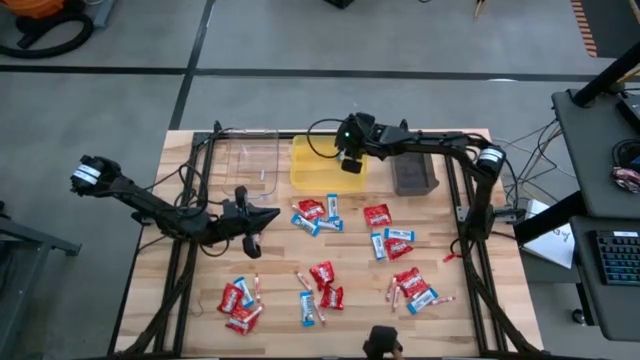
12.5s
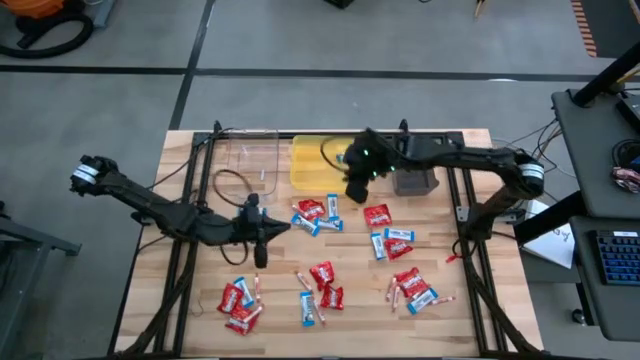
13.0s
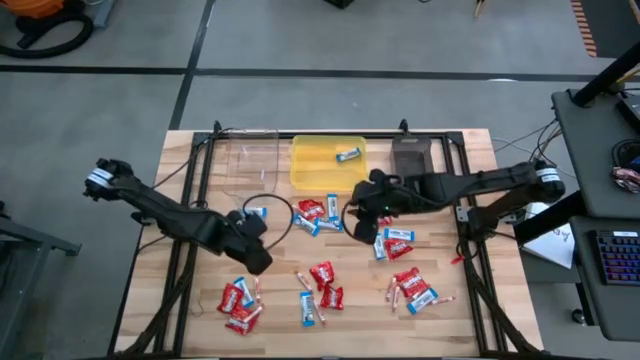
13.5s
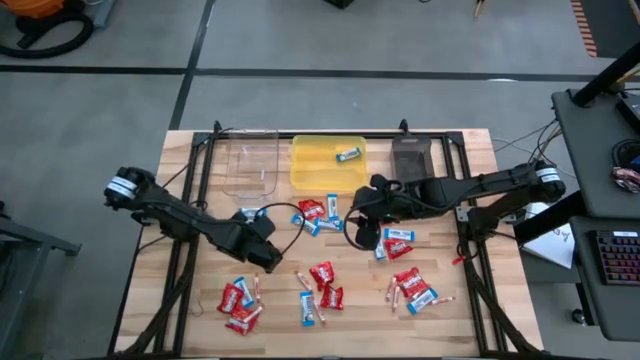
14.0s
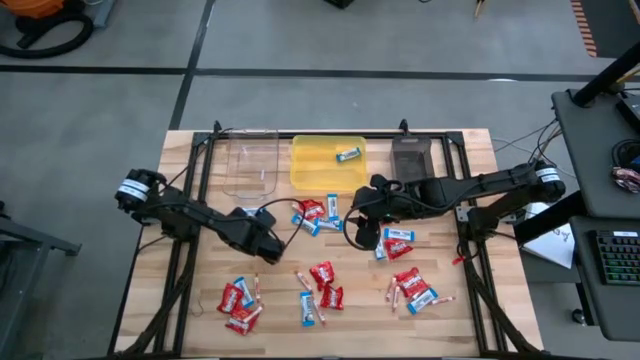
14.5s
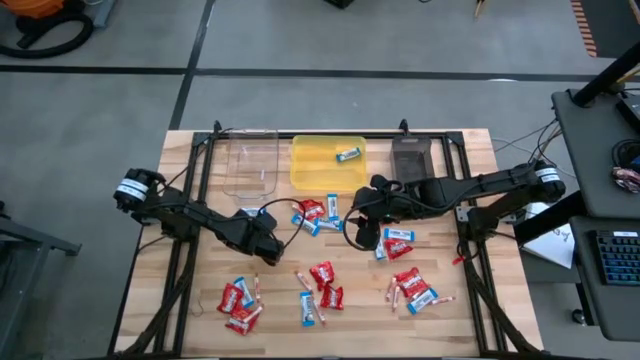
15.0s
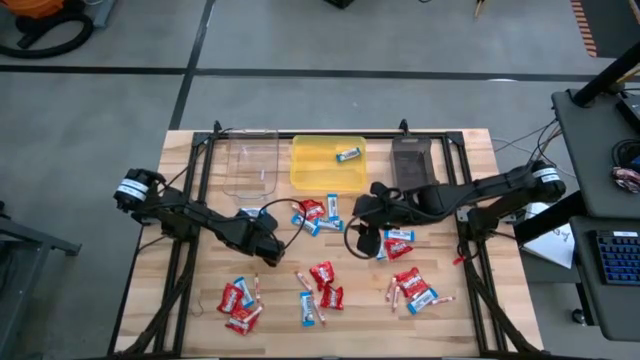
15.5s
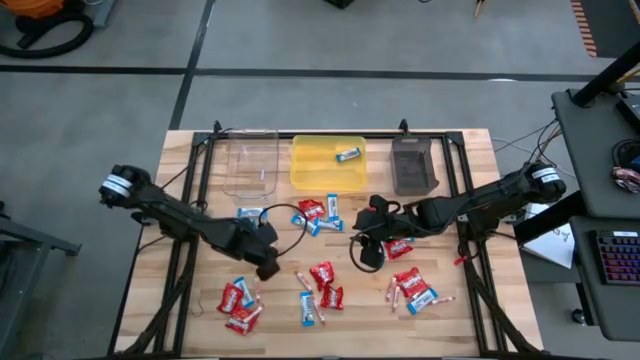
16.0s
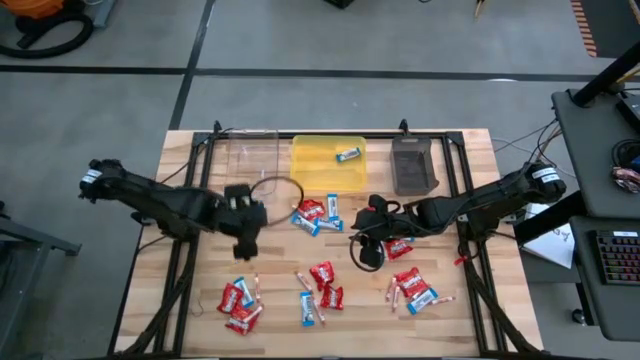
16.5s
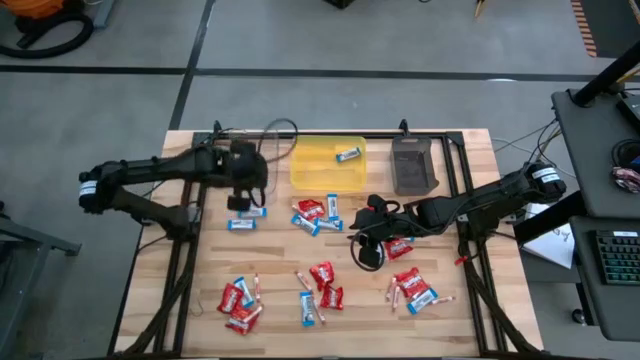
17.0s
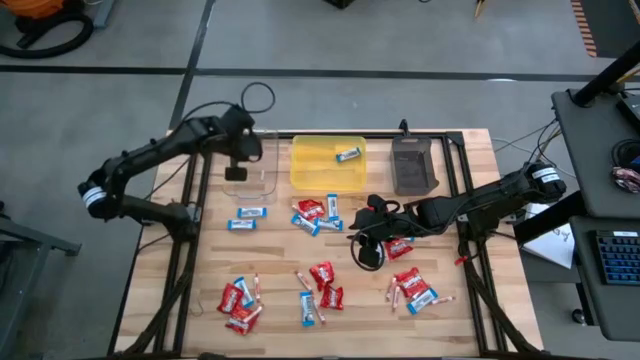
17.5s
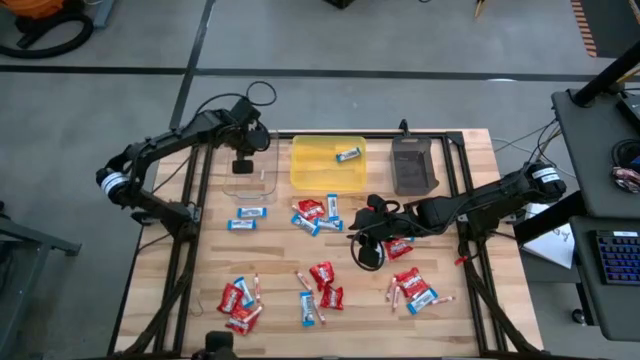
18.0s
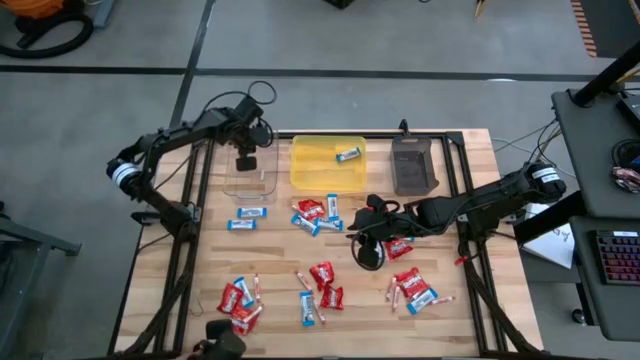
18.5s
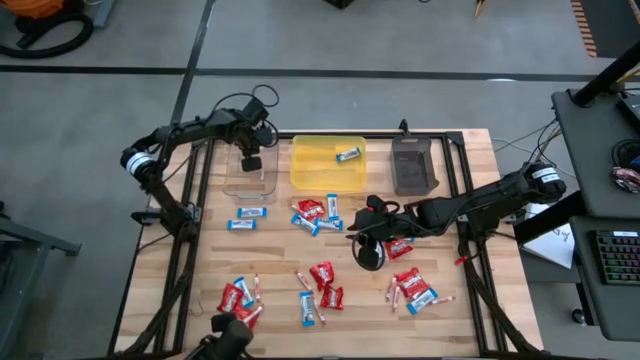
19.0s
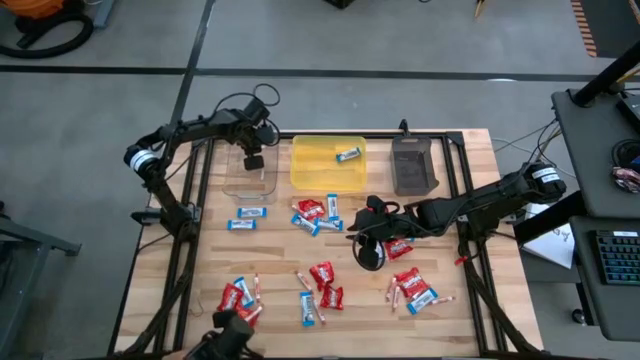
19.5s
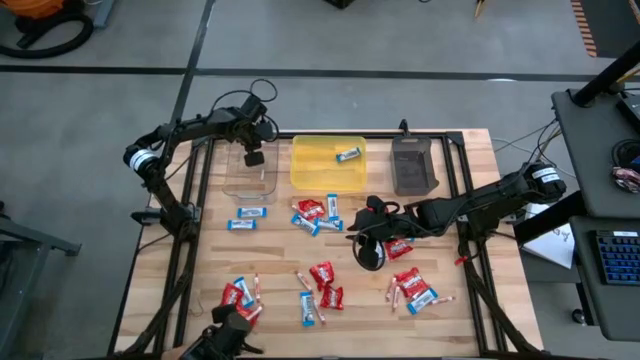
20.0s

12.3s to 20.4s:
Task: Sort candy
Put the orange candy into the transparent bin

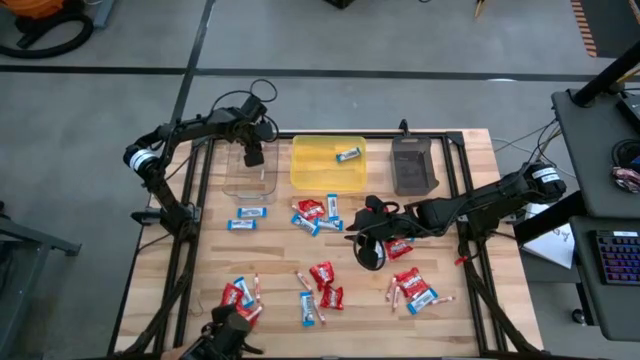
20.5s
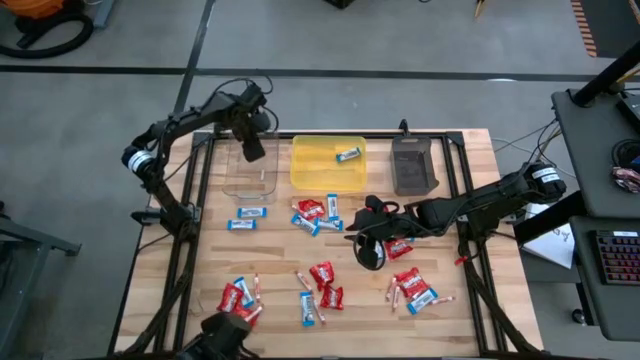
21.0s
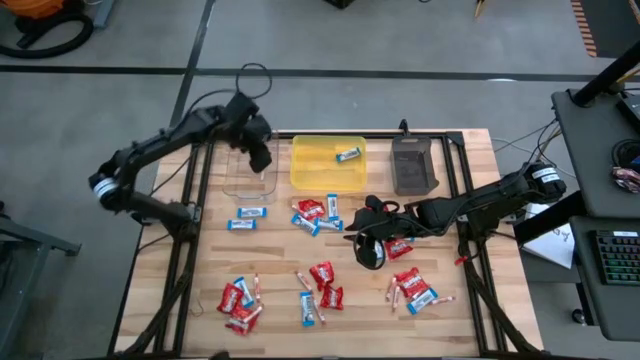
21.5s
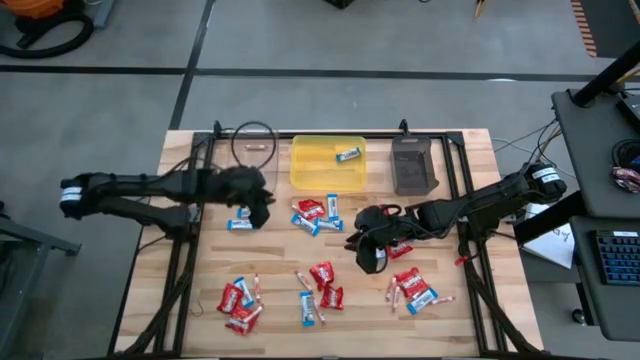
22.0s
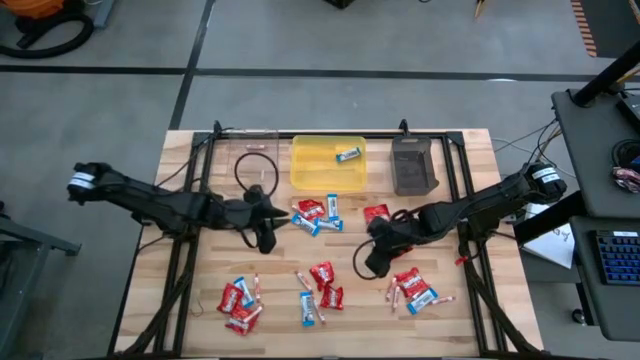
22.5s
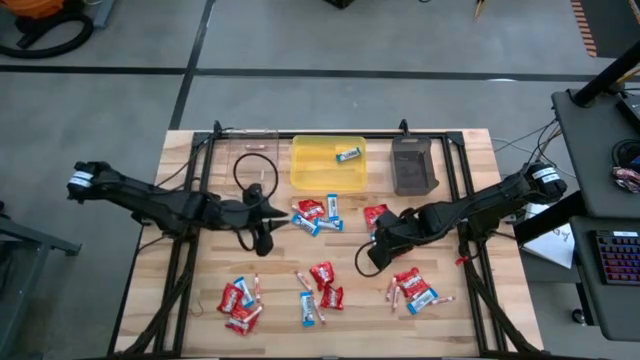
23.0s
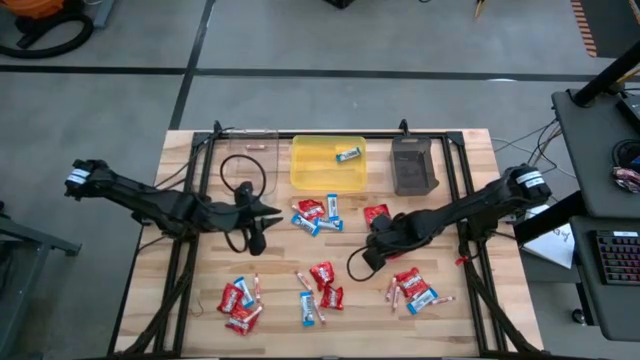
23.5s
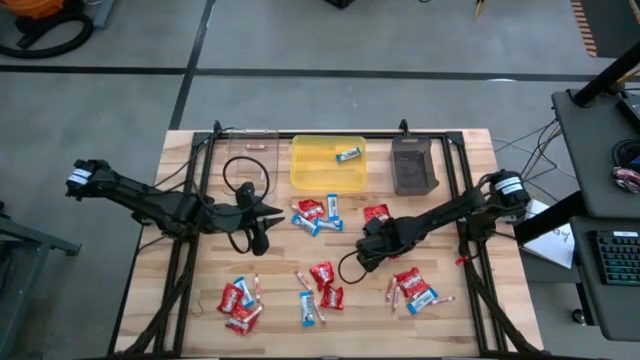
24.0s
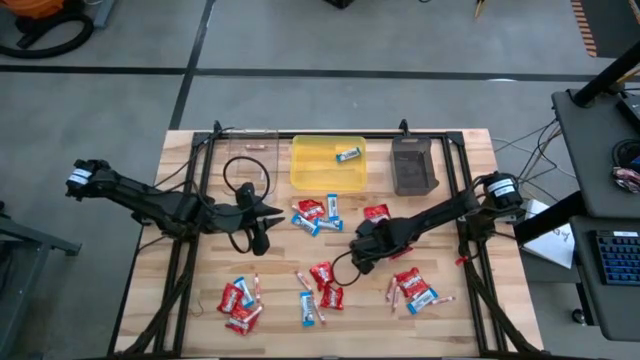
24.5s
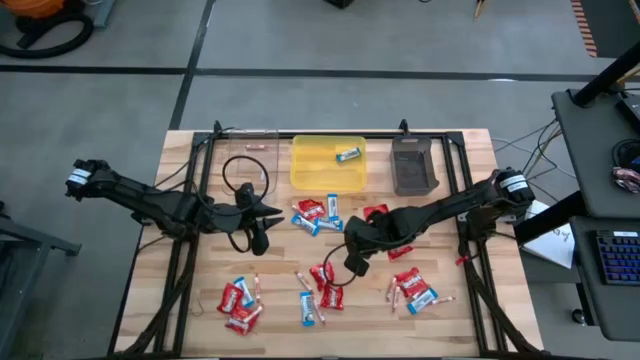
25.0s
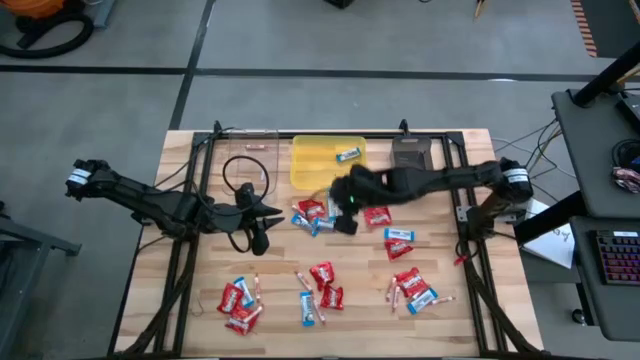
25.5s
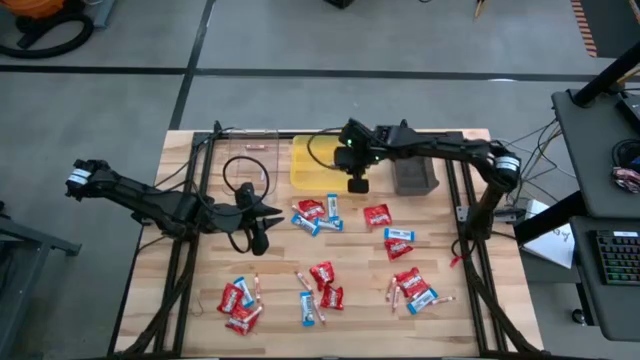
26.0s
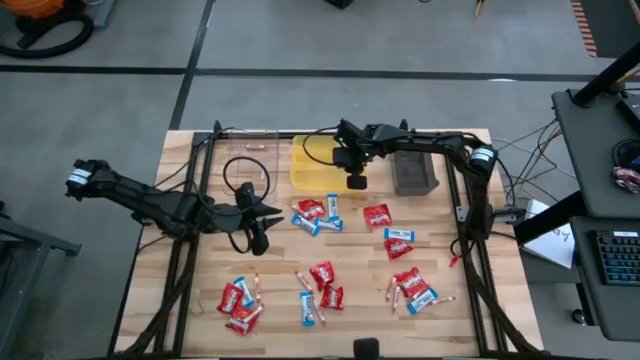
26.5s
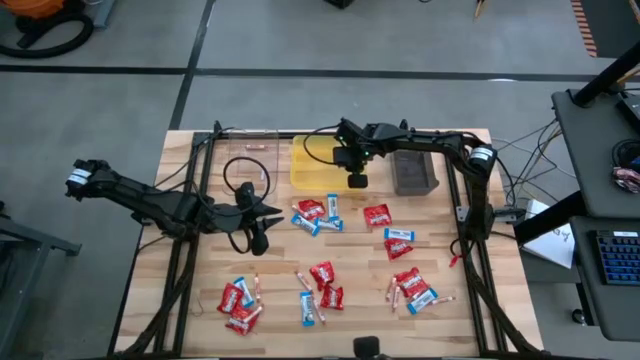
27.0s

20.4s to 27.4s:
Put the white chocolate into the yellow bin

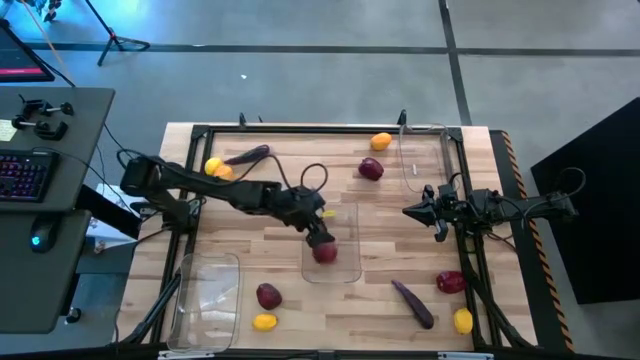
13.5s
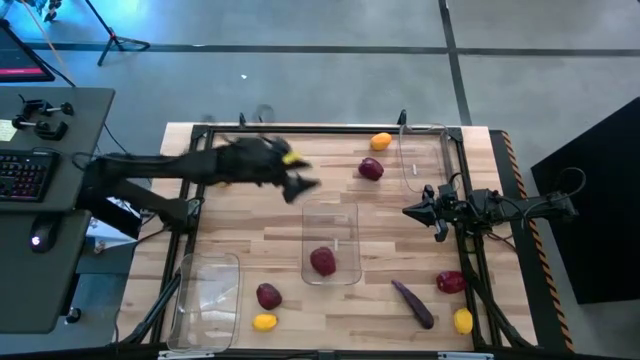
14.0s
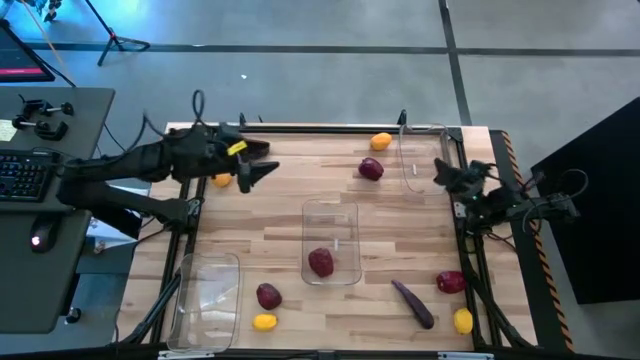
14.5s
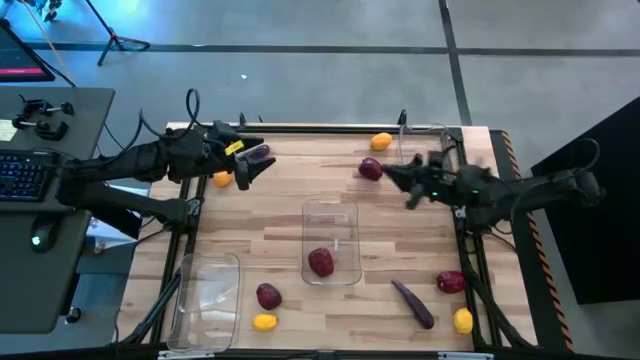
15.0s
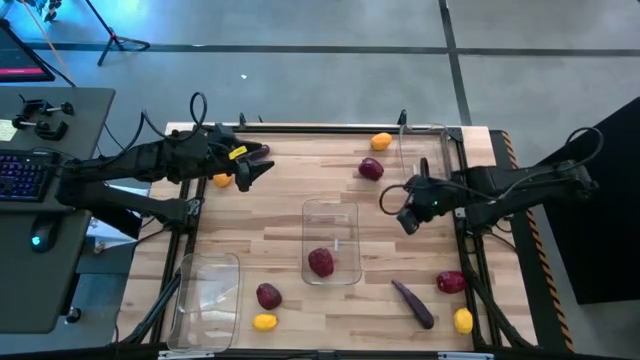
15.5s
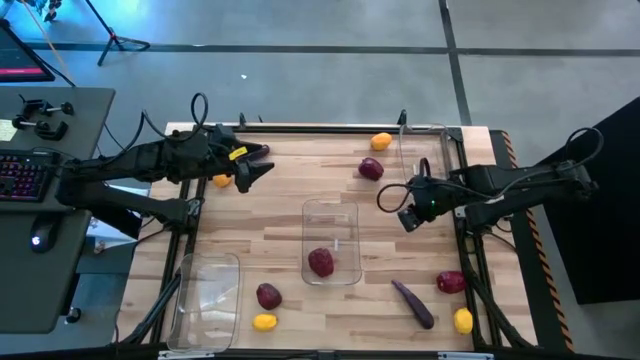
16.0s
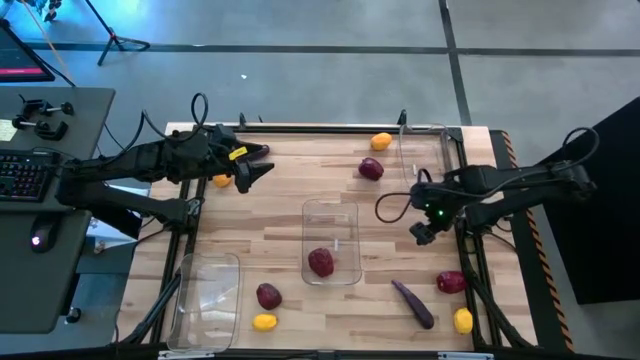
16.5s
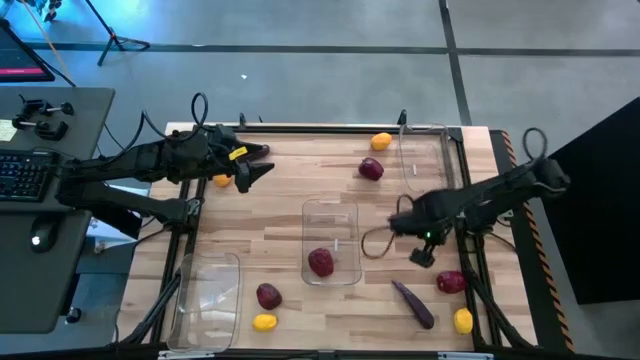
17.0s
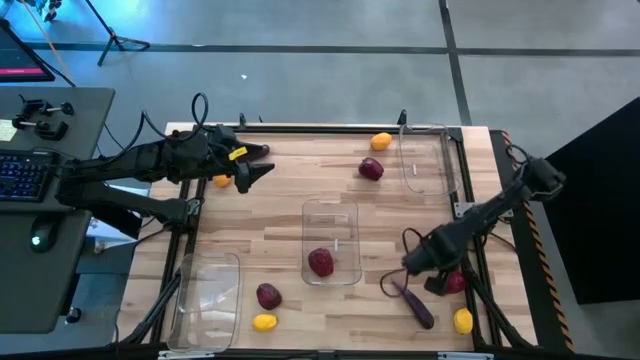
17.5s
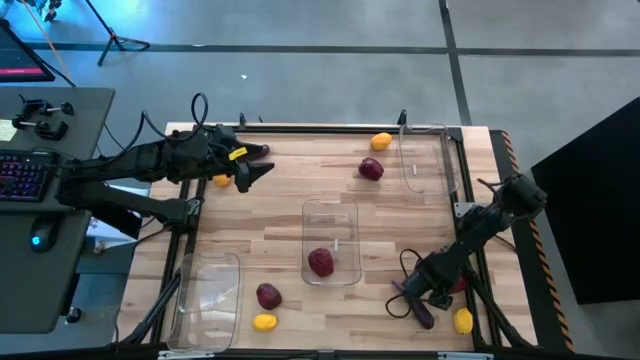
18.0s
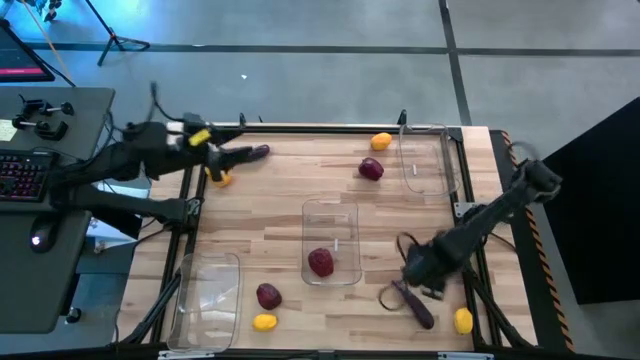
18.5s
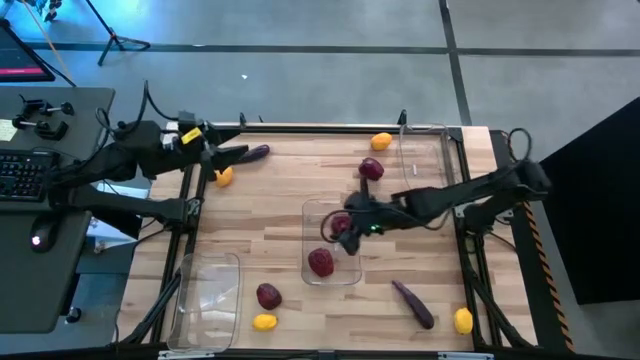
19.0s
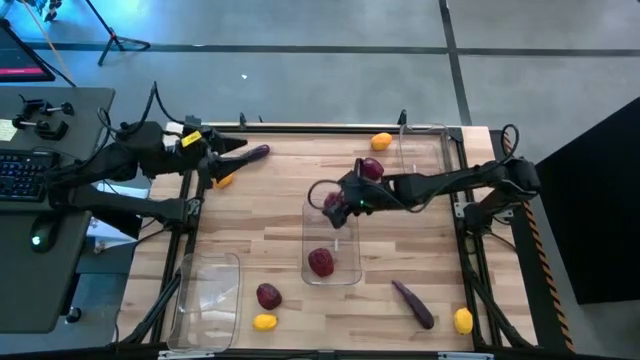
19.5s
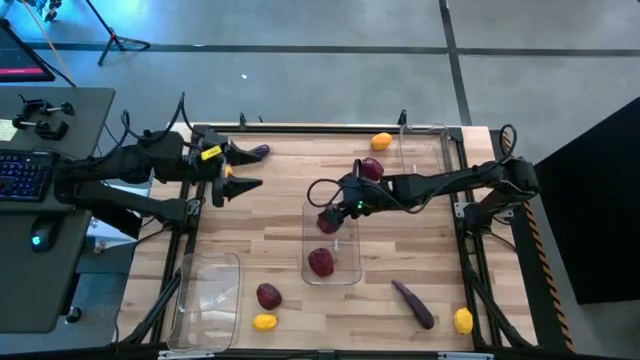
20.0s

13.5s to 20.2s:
Task: Sort produce into baskets
Put the red apple into the middle transparent bin
